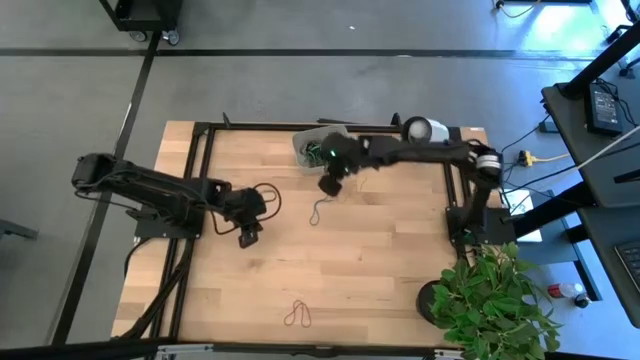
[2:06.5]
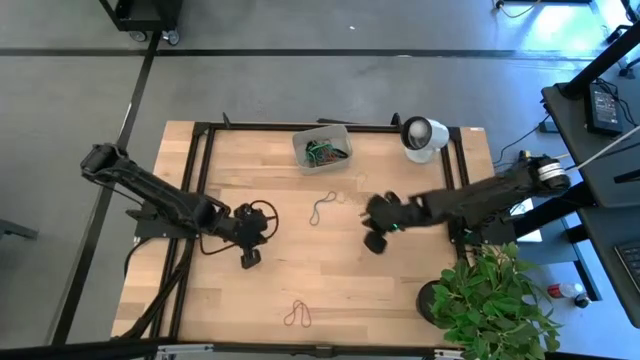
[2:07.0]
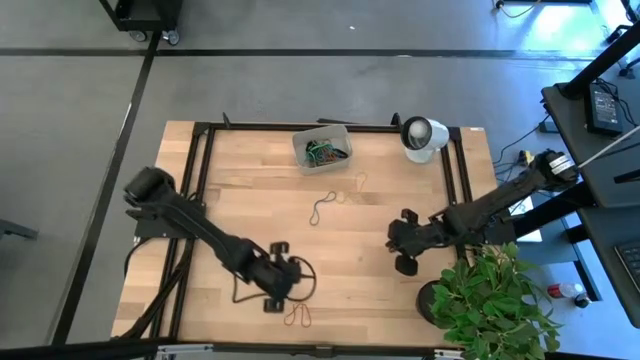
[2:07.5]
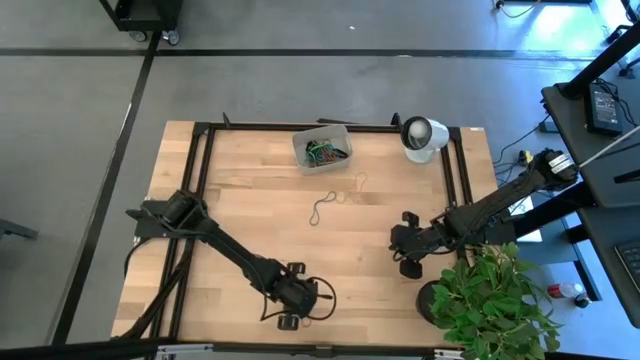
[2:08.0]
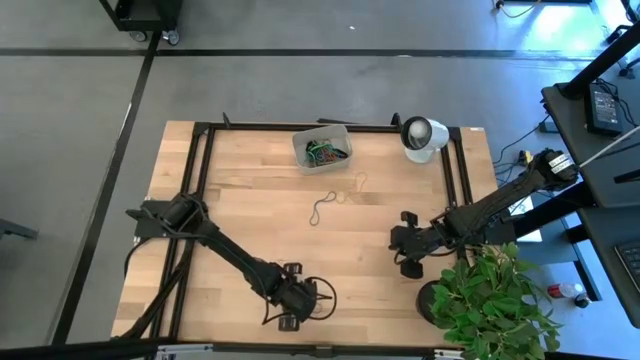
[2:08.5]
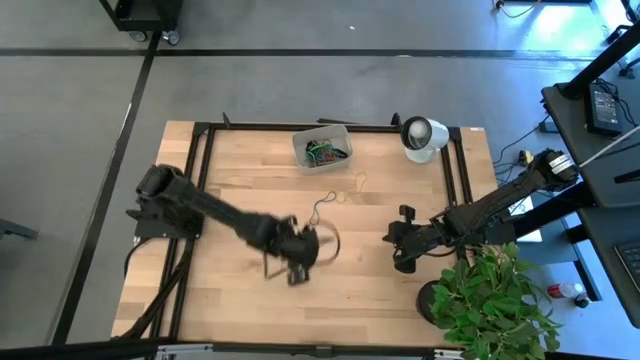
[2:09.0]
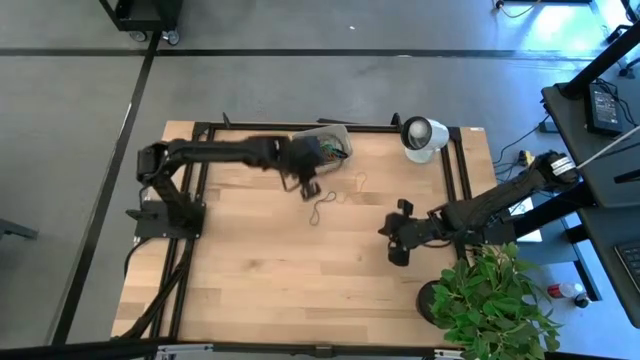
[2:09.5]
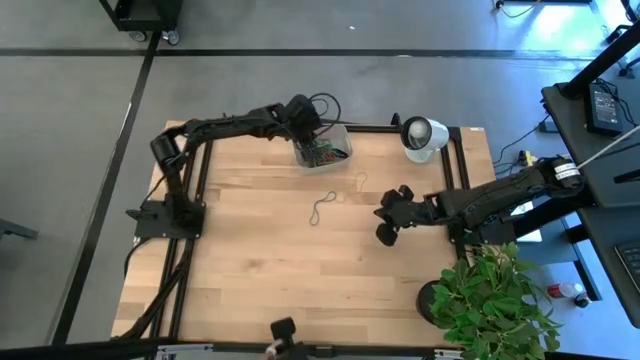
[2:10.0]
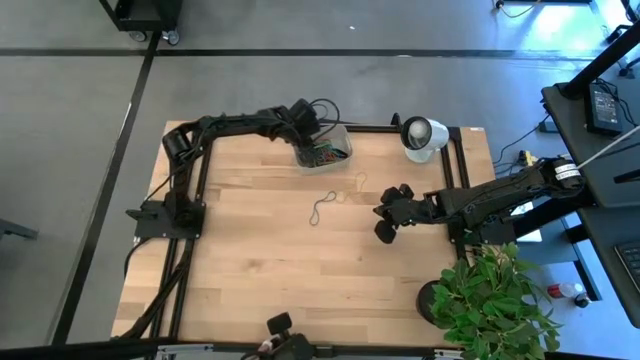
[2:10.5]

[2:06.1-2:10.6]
Task: Pick and place rubber bands into bin
Put the red rubber band into the gray bin

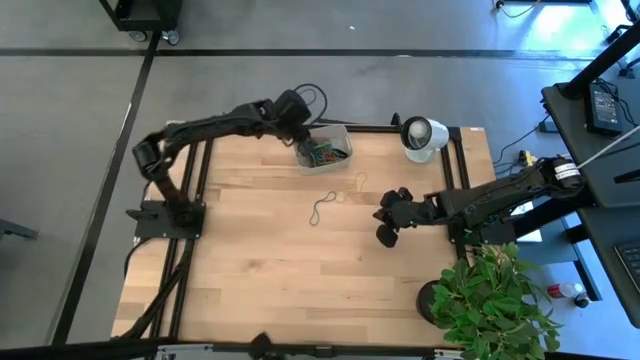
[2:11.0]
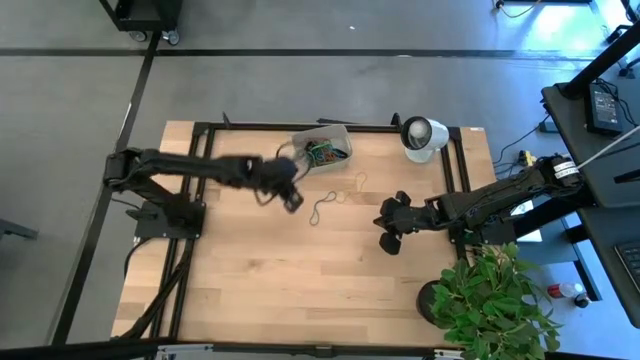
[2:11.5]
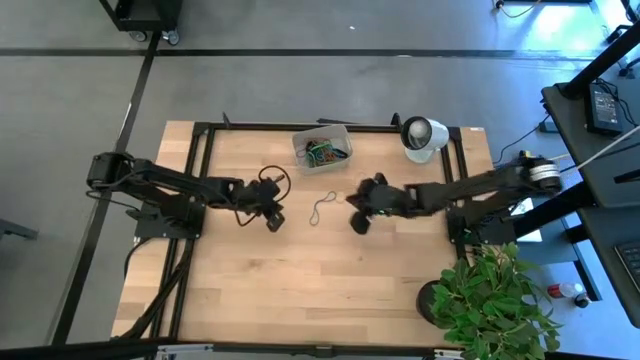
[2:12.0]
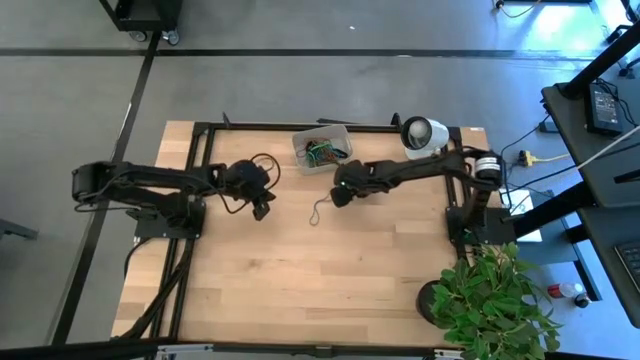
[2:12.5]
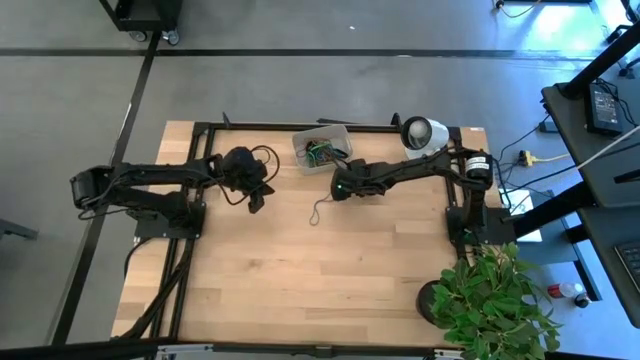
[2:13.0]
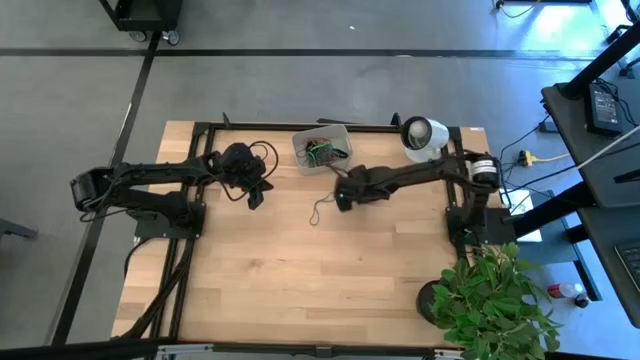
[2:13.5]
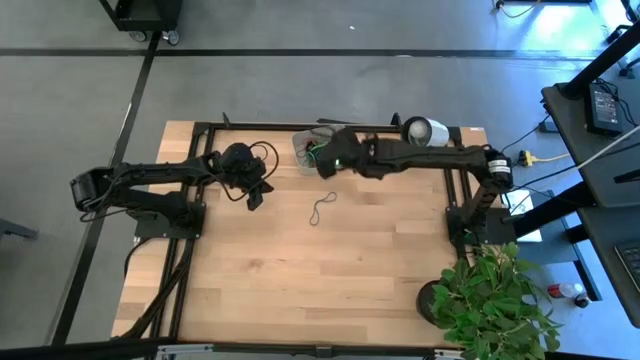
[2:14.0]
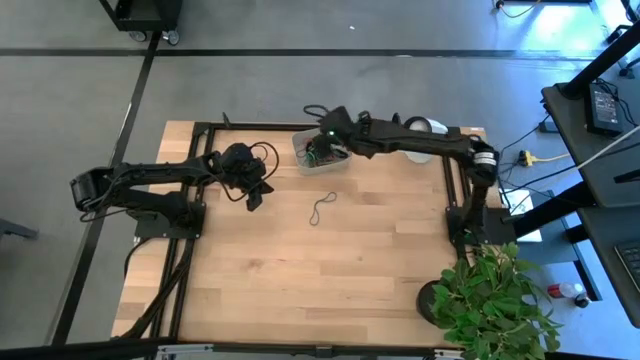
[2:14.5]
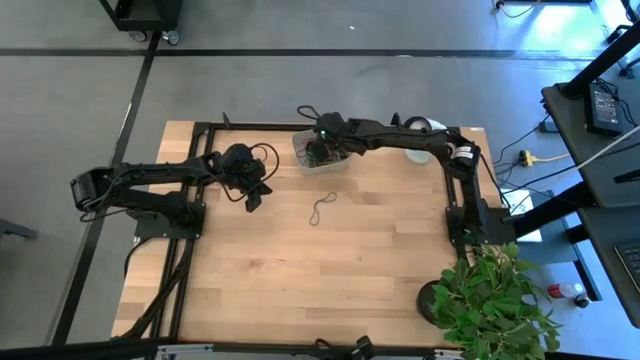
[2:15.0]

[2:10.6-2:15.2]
Put the yellow rubber band into the gray bin

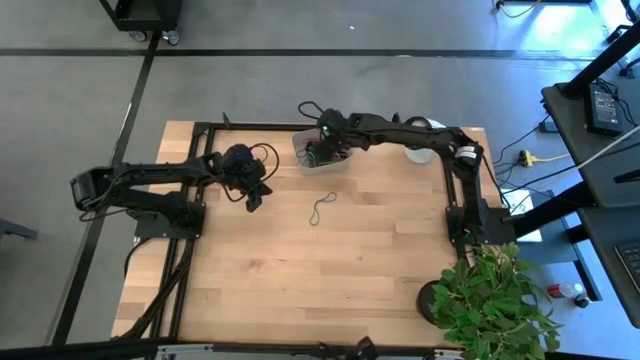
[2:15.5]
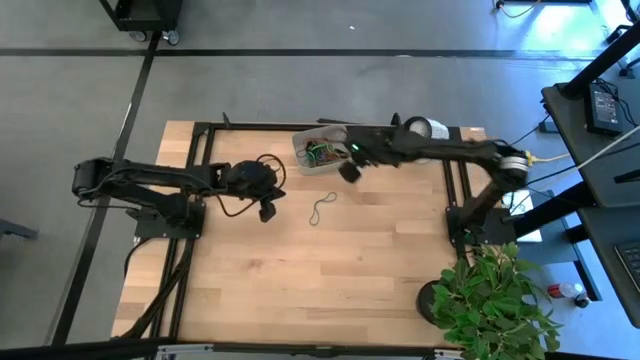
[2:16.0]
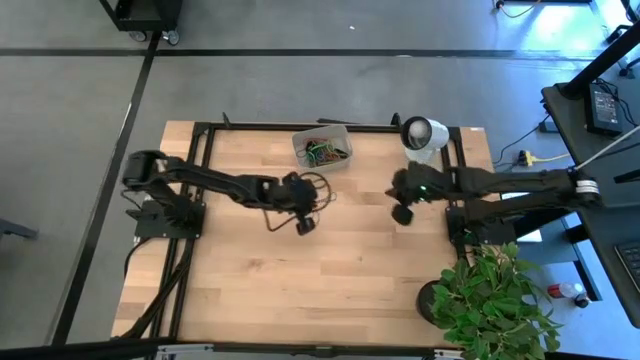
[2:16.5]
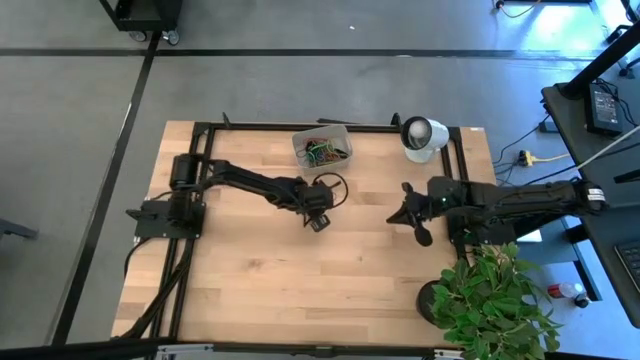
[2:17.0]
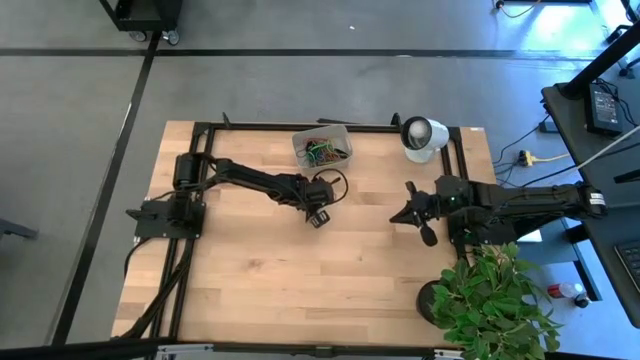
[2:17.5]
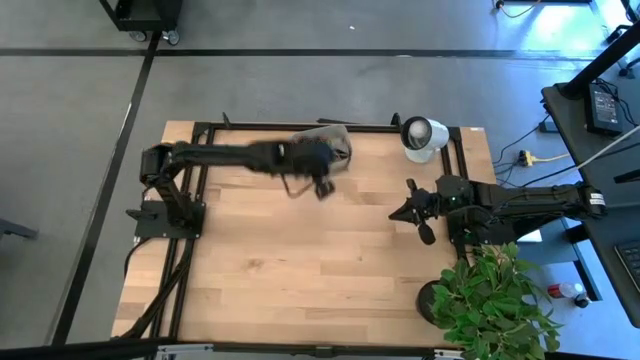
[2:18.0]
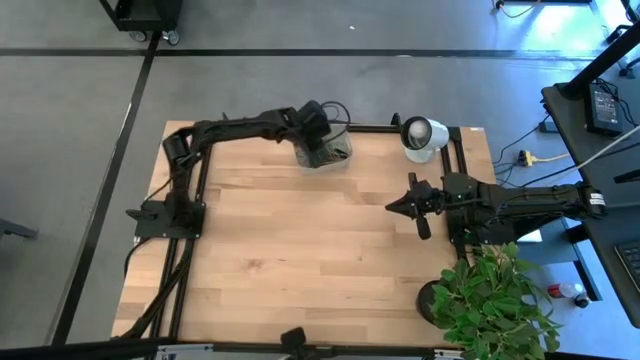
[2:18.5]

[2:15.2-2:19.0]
Put the blue rubber band into the gray bin

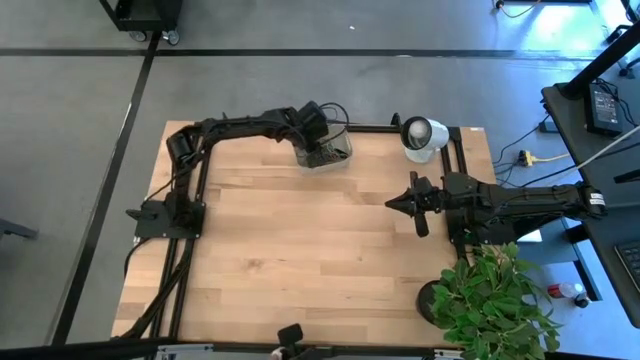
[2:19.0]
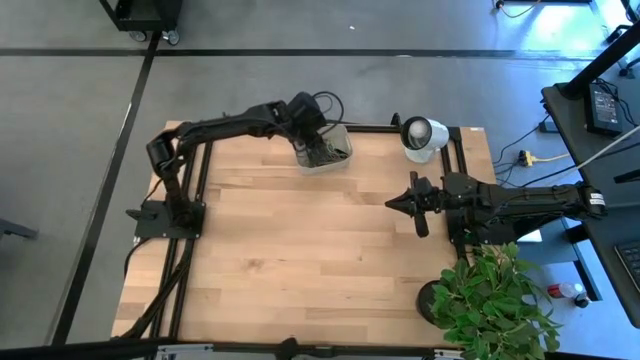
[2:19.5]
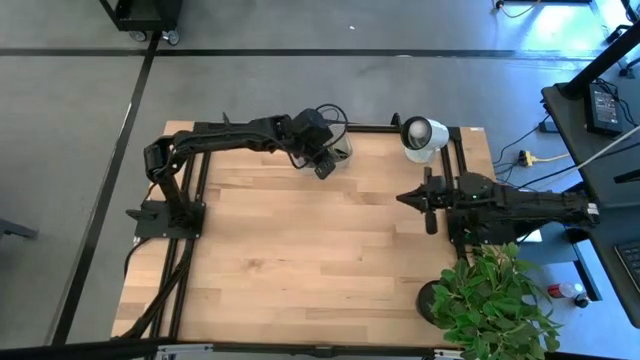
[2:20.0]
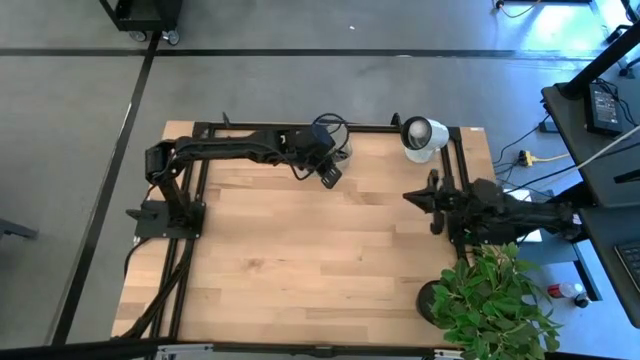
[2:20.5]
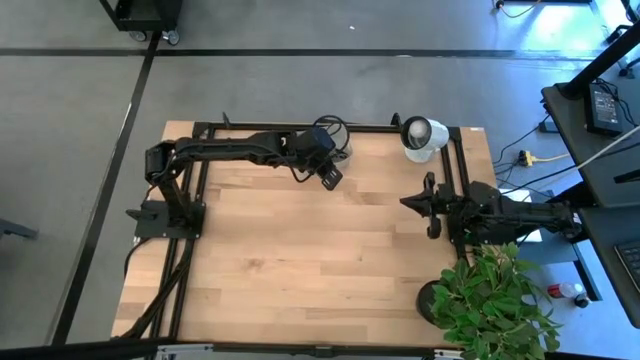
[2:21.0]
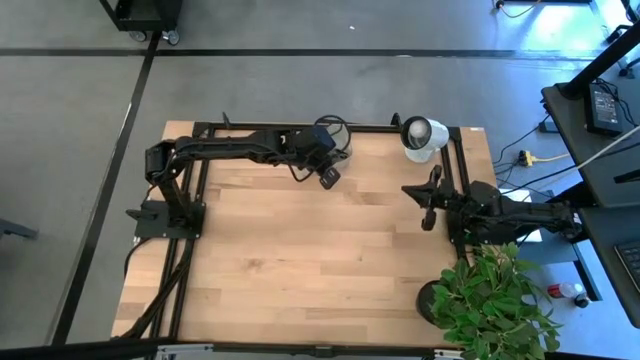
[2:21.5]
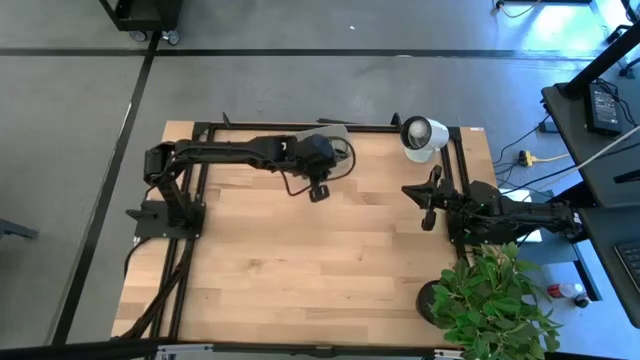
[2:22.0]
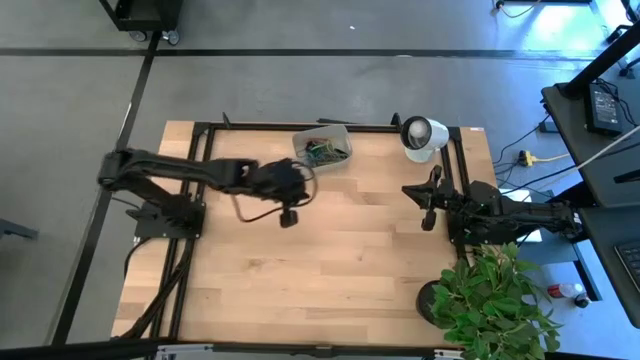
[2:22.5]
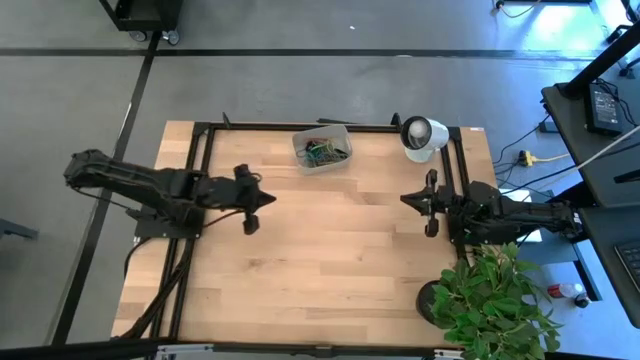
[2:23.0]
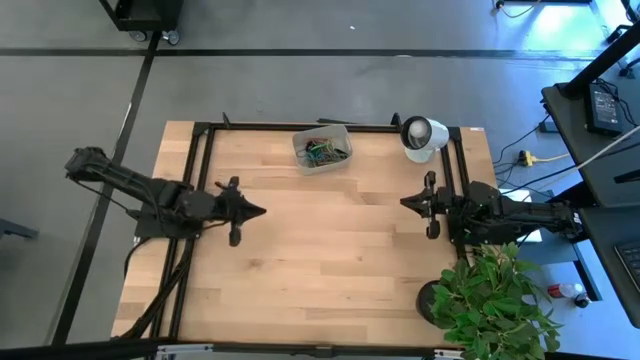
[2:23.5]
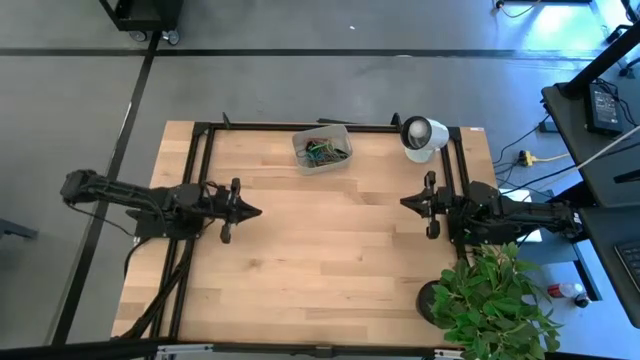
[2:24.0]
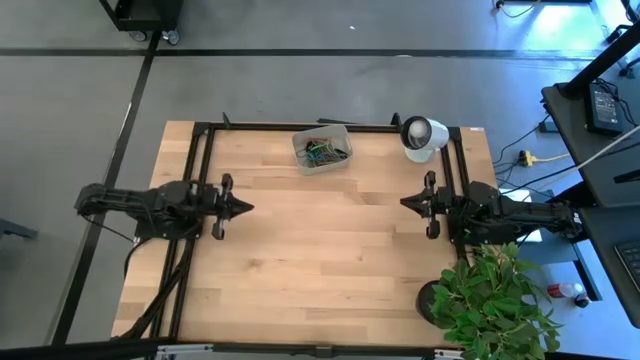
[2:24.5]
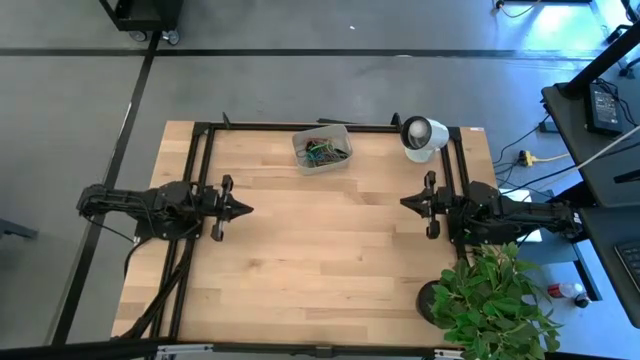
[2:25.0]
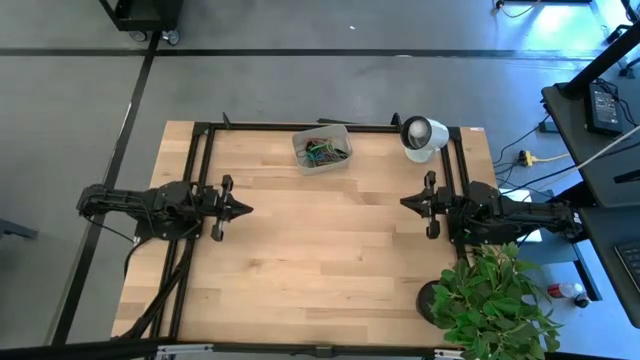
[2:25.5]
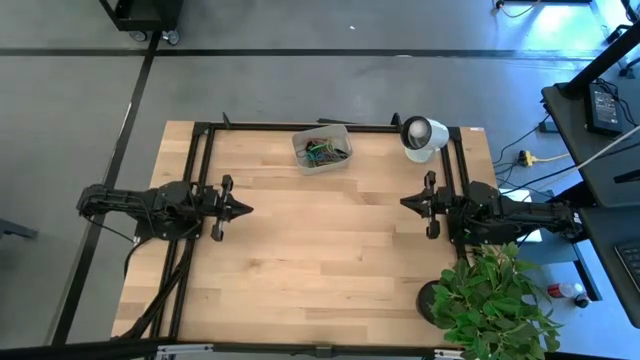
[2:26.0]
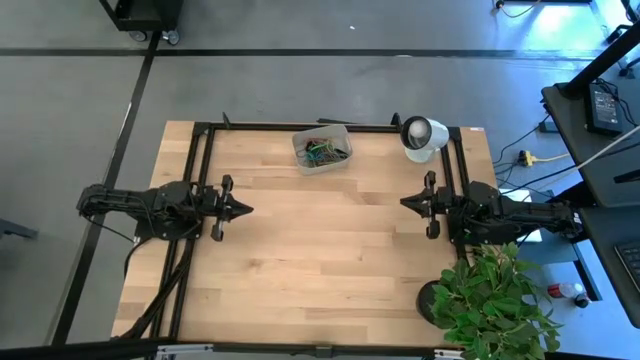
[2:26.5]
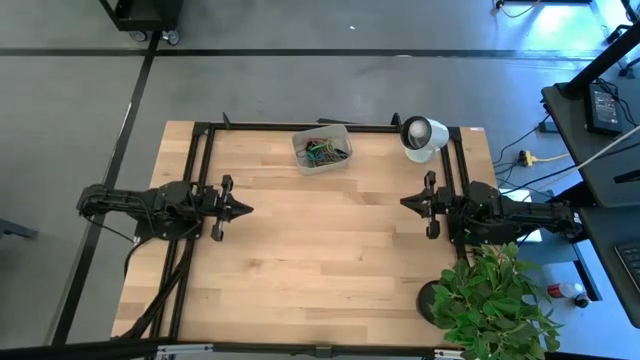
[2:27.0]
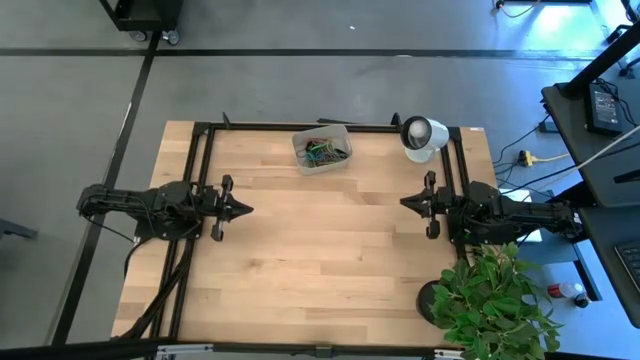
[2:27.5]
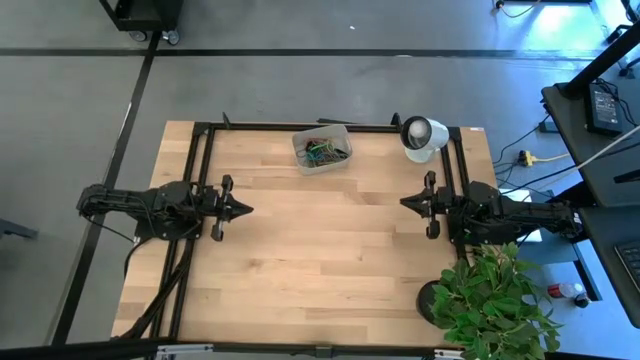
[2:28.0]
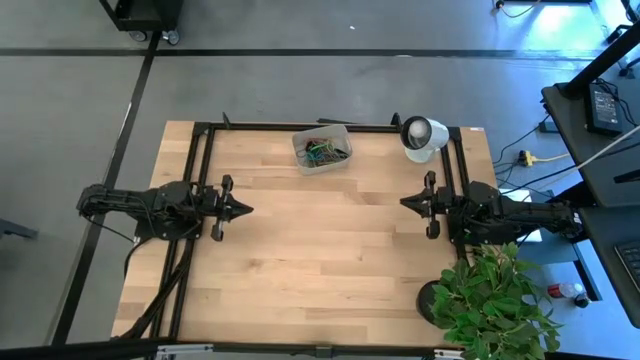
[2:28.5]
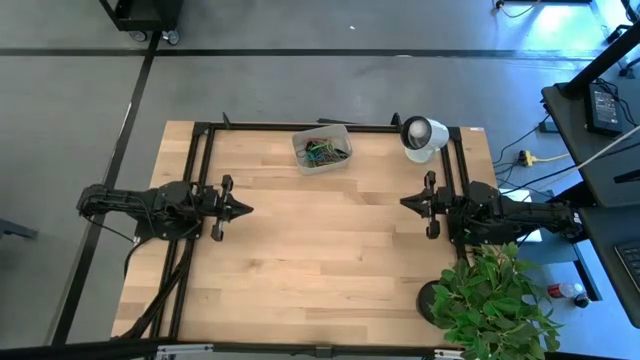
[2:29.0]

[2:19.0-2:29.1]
Return to Home Position
